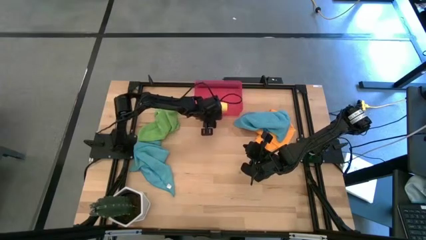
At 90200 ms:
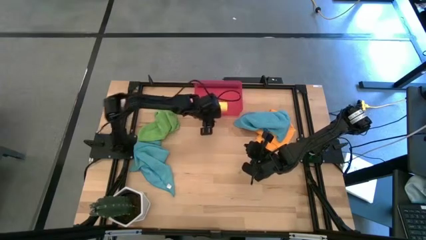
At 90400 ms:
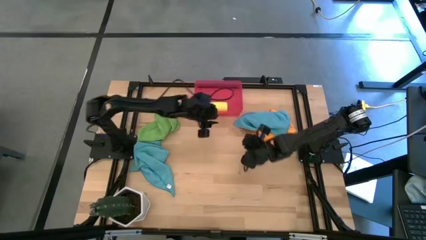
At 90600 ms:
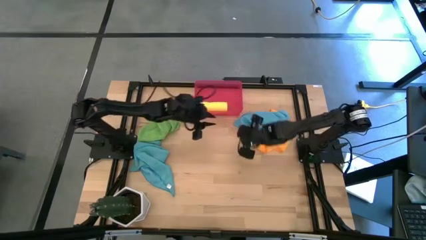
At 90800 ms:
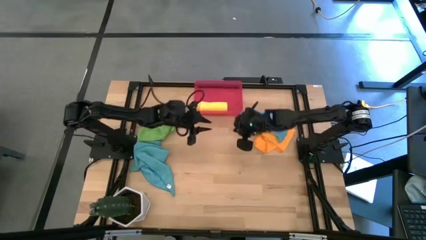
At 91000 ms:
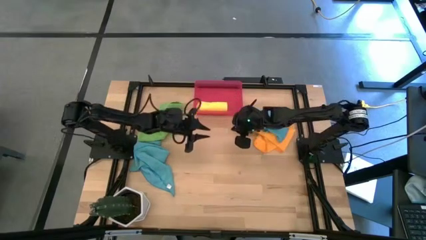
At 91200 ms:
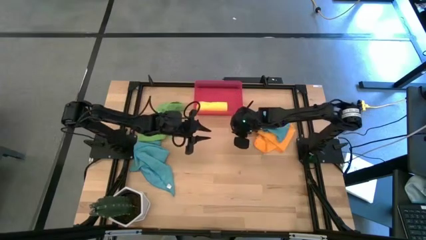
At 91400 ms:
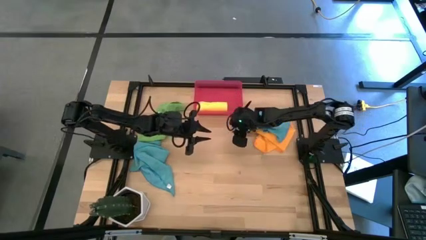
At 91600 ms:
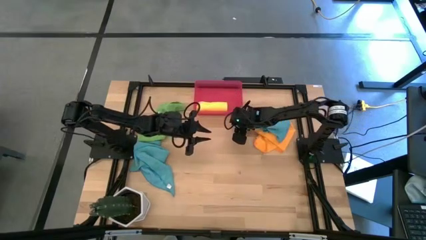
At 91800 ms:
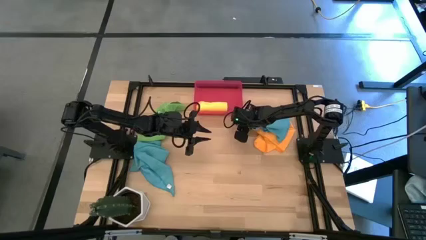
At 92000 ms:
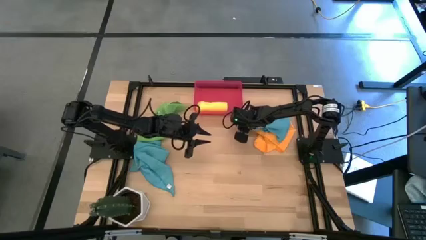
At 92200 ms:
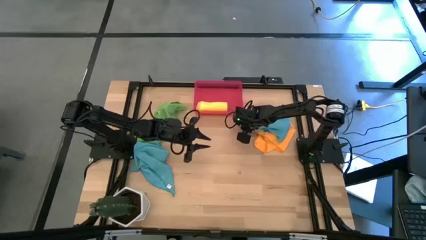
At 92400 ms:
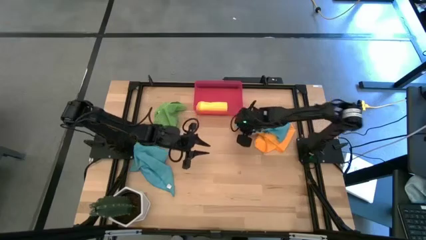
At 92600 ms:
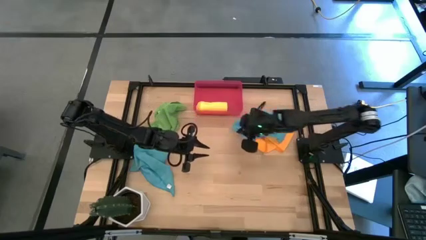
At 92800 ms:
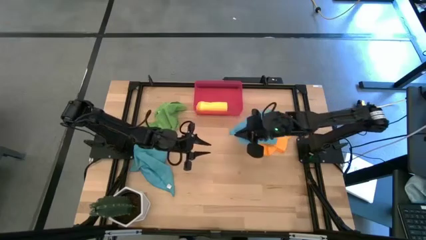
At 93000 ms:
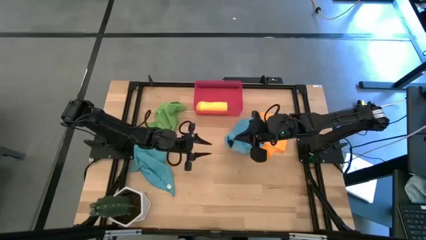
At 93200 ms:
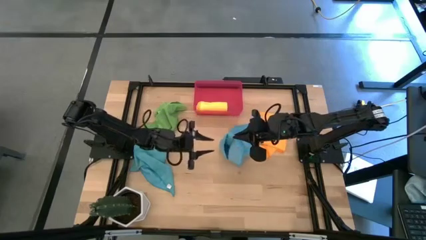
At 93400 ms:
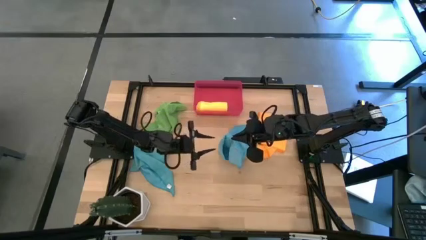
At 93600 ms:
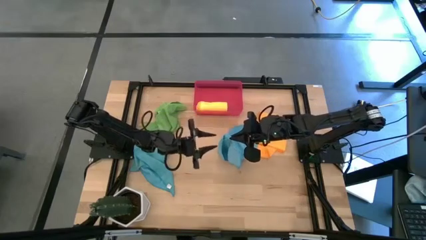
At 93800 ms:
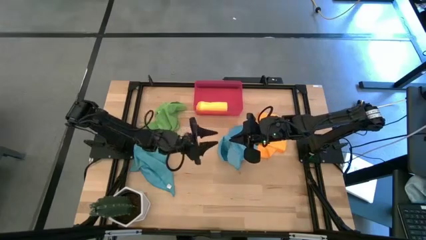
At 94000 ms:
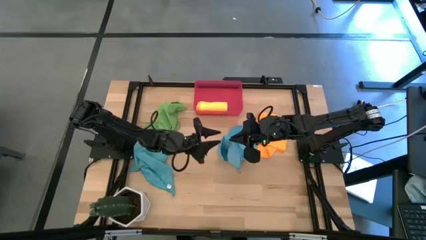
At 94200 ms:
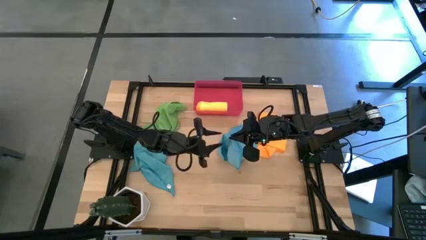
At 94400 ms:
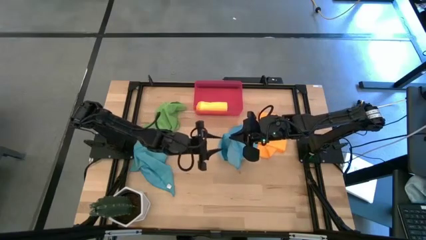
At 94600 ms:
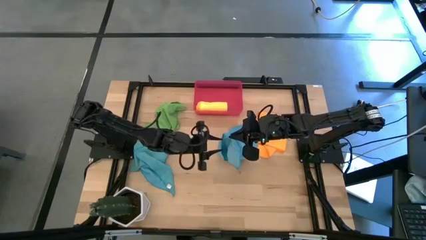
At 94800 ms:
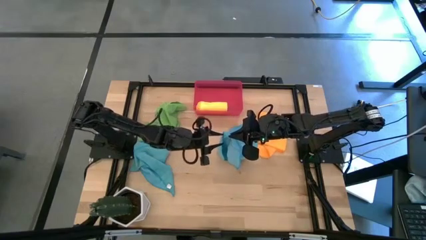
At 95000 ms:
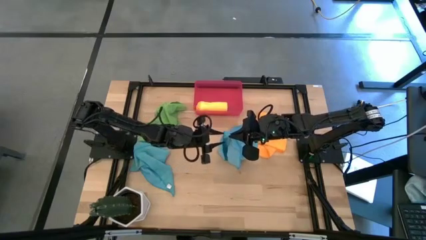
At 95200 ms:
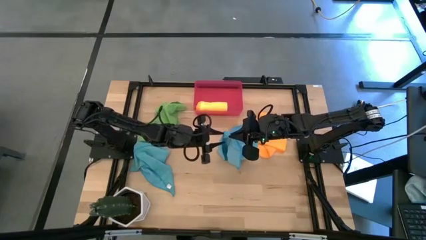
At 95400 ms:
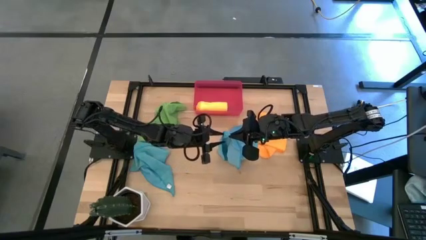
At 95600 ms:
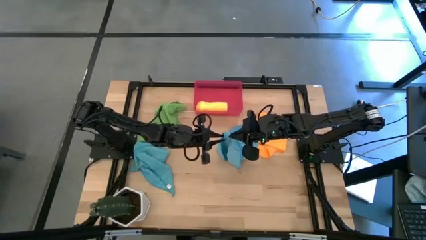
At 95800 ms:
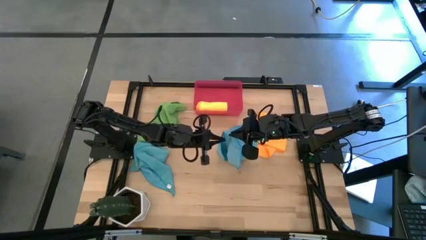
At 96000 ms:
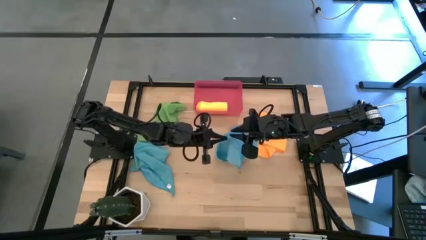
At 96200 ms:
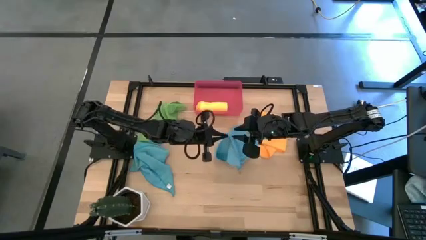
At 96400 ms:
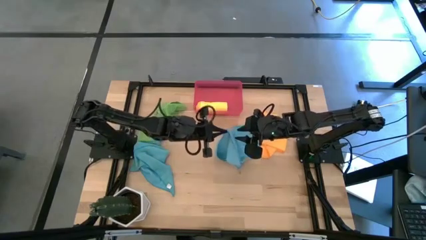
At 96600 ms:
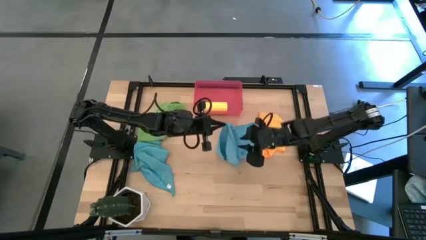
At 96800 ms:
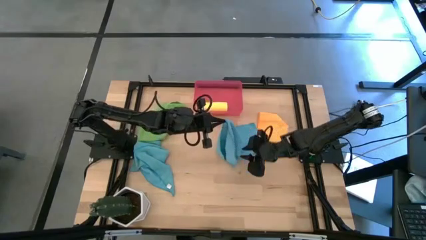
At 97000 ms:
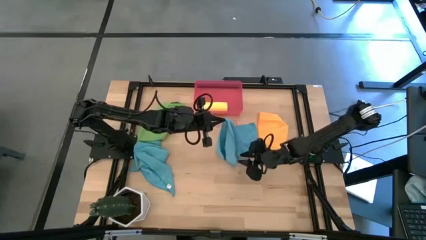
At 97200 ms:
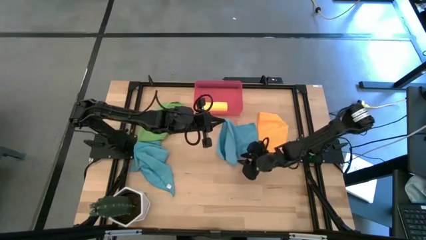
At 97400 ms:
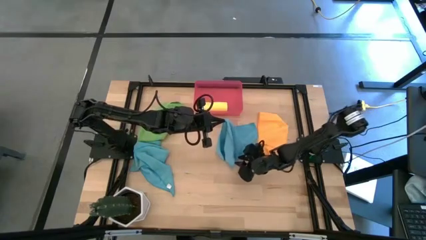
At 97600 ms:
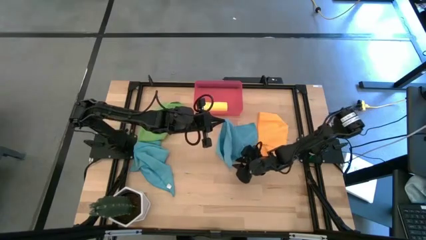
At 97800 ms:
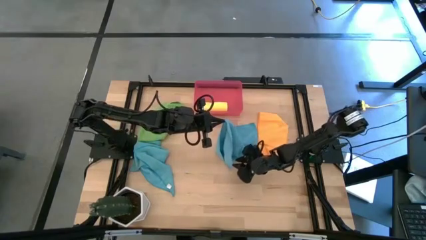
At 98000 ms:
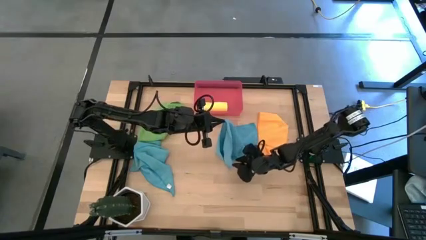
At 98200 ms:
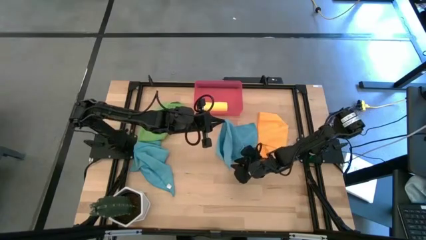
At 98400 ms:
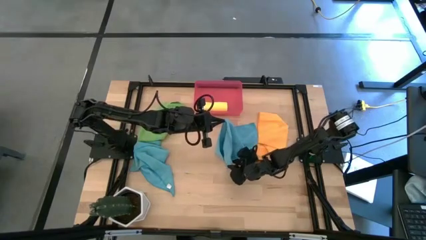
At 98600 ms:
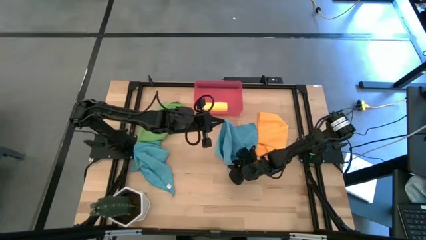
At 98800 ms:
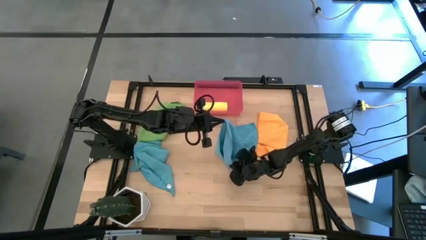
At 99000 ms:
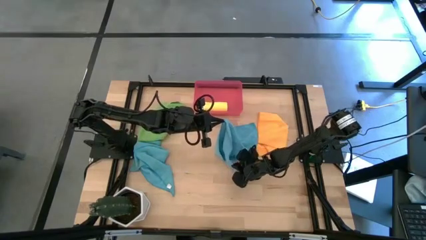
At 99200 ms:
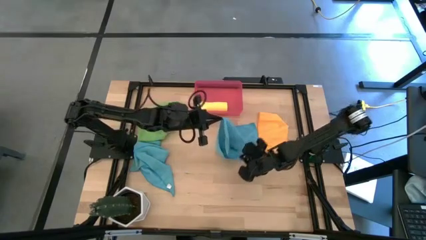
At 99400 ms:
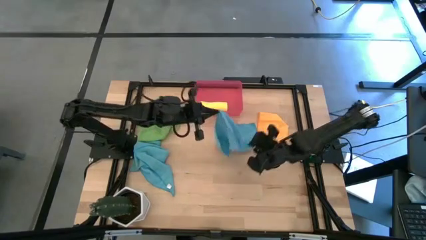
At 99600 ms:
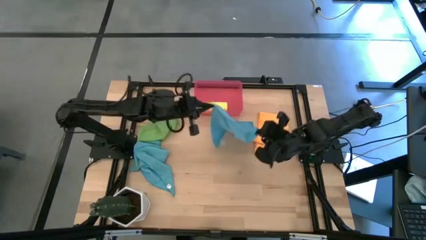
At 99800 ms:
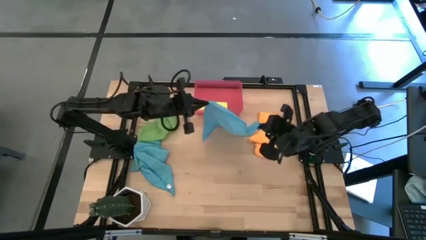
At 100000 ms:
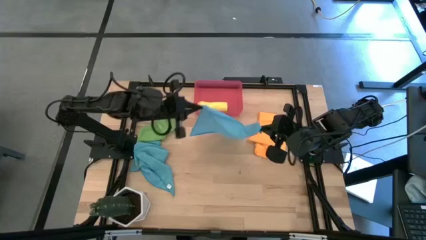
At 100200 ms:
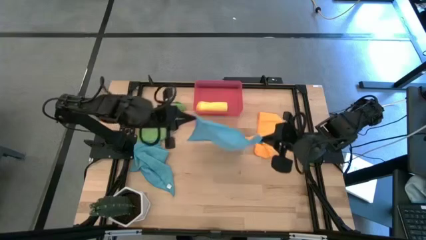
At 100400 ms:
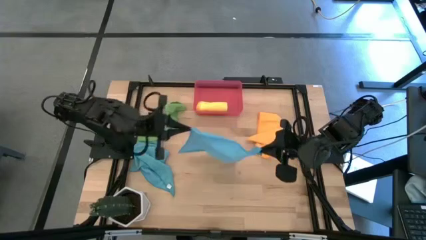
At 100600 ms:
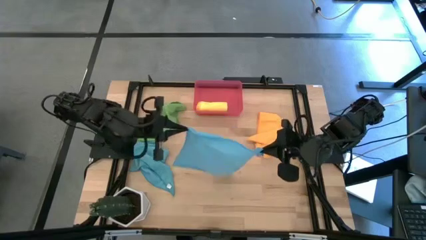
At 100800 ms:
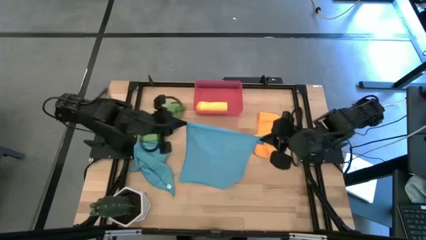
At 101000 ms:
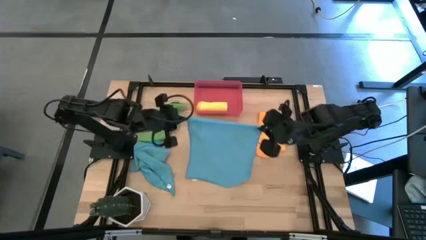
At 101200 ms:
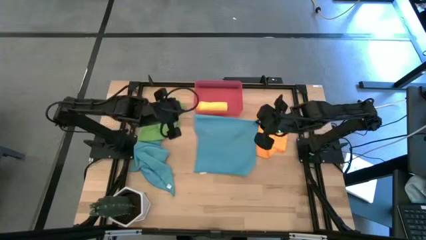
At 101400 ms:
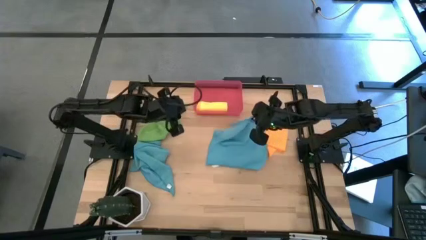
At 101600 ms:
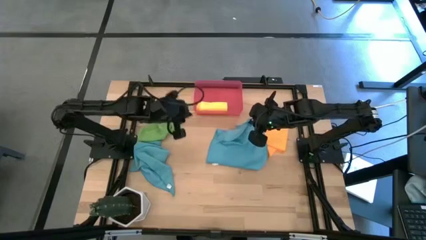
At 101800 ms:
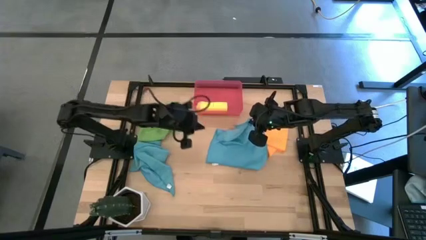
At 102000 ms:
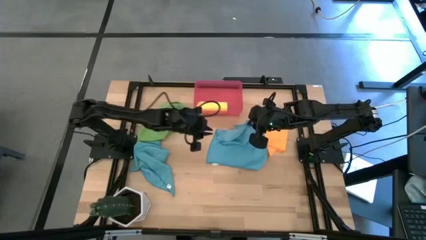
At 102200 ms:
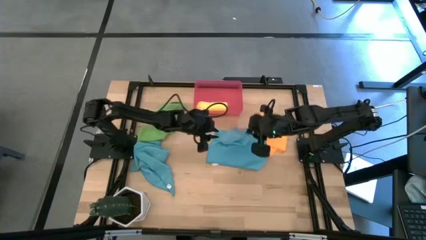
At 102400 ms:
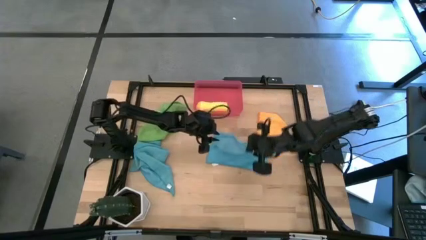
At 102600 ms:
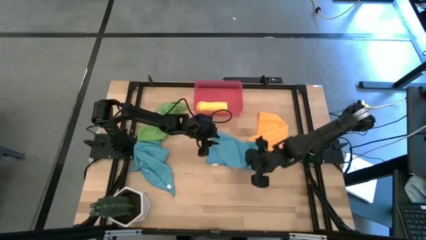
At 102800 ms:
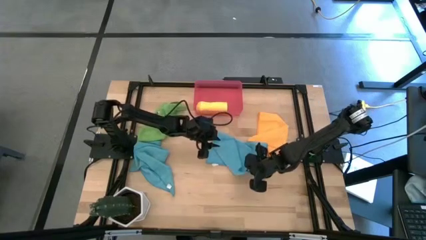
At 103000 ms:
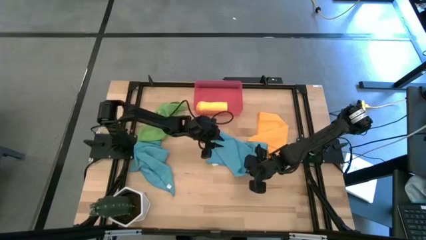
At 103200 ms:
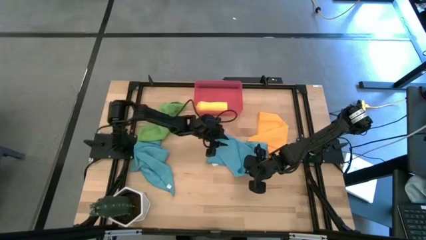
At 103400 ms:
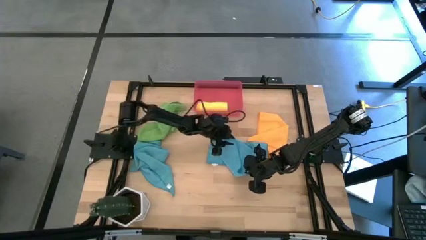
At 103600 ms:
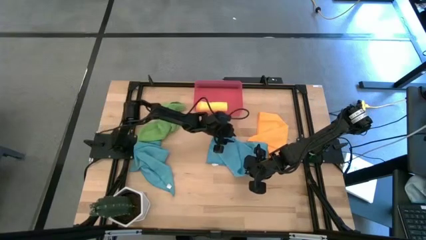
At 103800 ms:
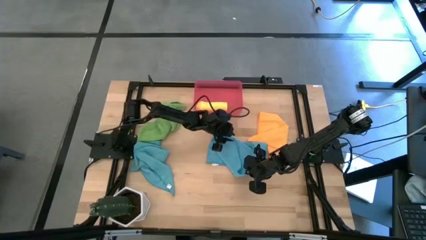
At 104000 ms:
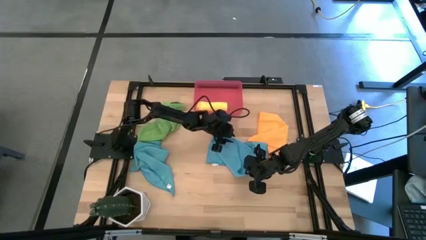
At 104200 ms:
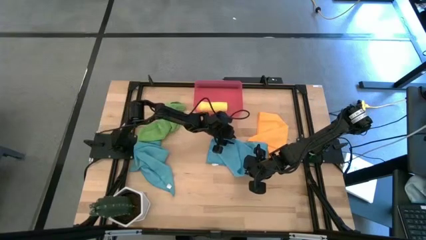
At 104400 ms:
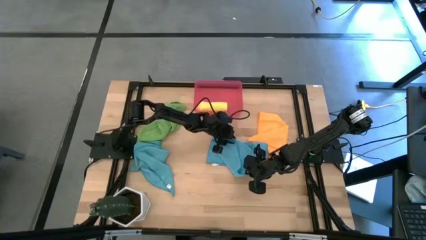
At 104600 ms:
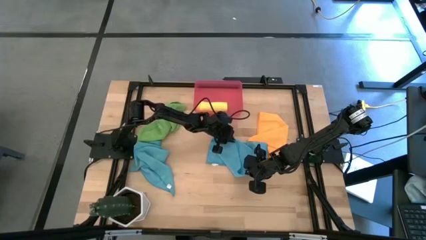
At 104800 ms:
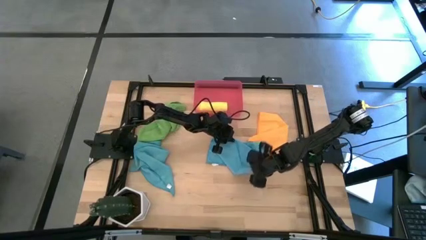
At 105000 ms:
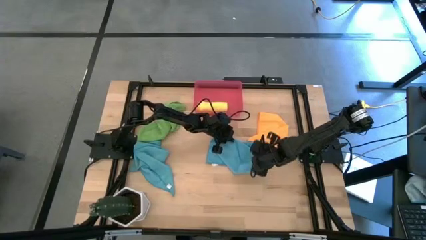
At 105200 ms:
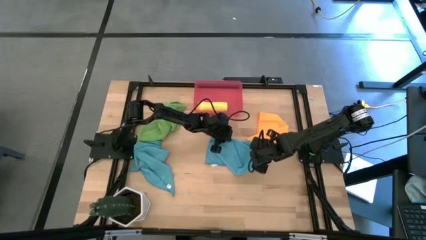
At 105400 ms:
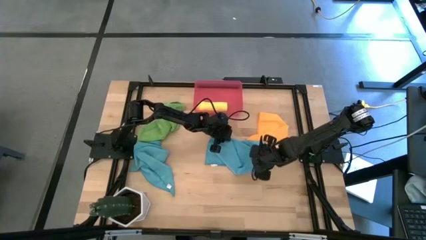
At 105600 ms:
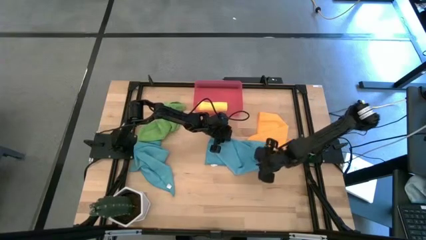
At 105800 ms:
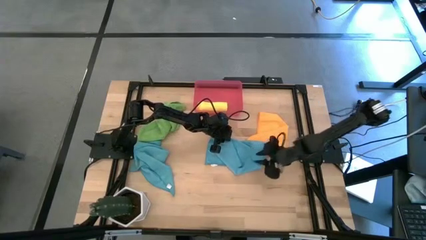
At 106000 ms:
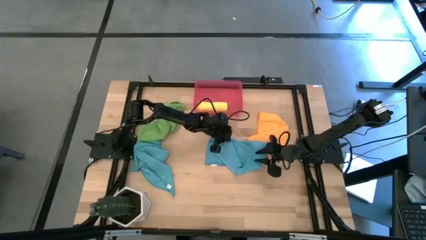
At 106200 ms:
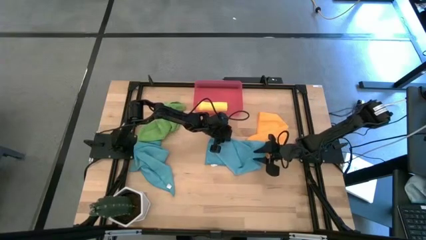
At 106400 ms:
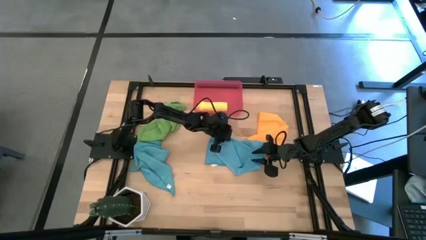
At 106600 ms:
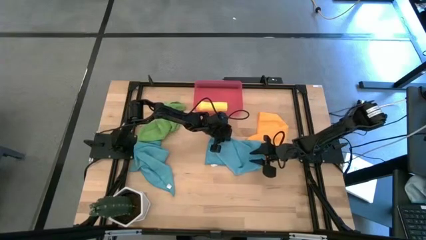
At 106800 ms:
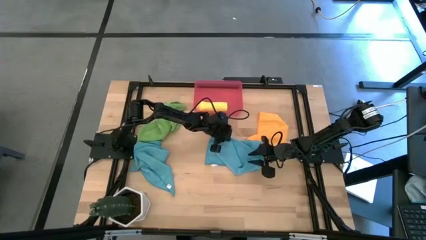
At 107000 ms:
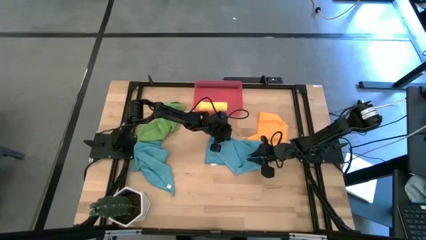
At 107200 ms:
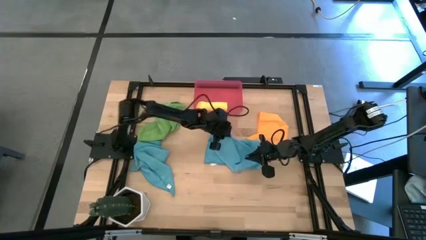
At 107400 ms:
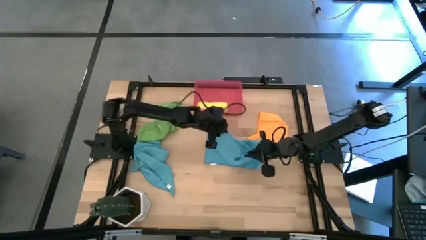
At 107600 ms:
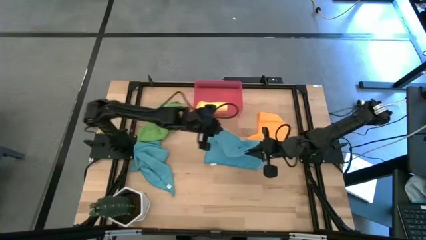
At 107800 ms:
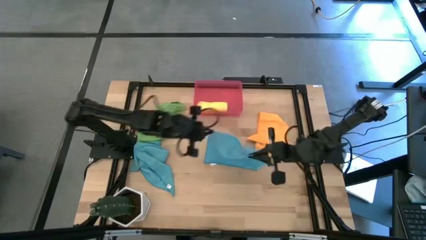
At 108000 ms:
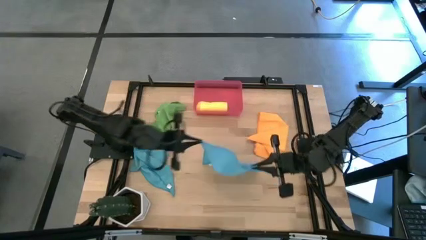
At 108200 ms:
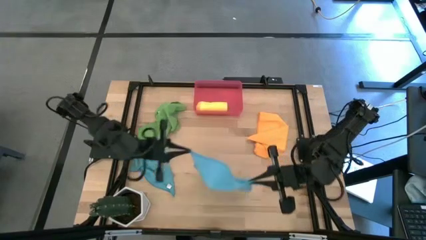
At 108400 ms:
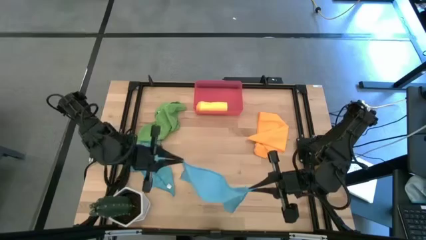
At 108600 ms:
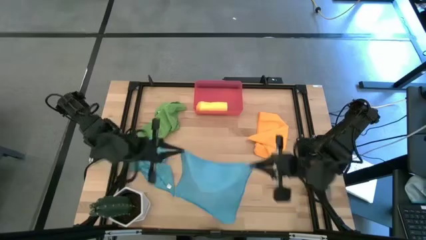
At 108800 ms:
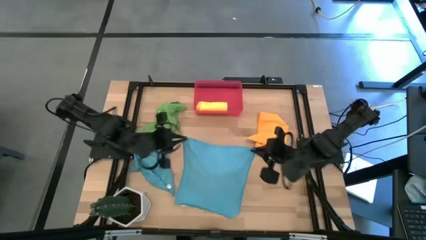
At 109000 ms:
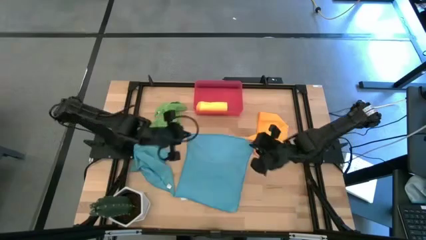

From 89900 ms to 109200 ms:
Task: Roll microfiber towels into tight, uniform cylinder then place into a basket
Roll the left blue microfiber cloth
